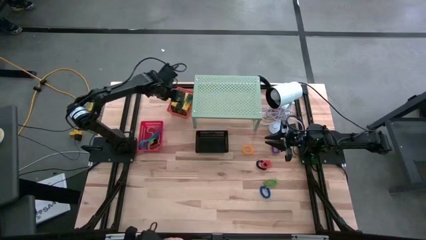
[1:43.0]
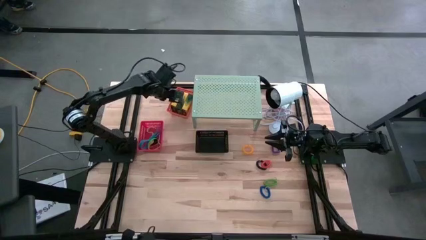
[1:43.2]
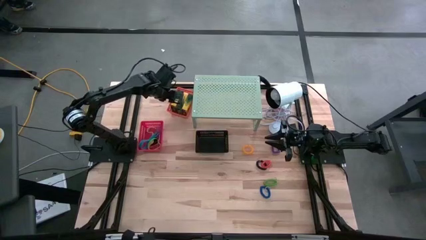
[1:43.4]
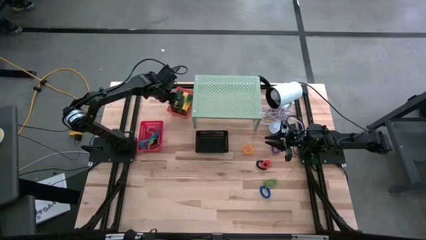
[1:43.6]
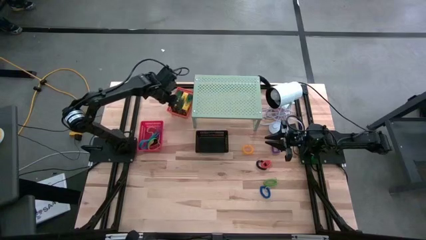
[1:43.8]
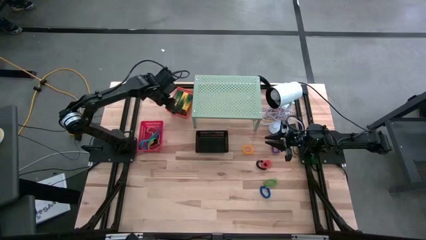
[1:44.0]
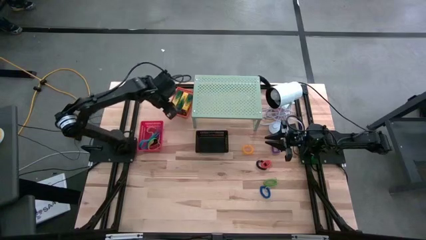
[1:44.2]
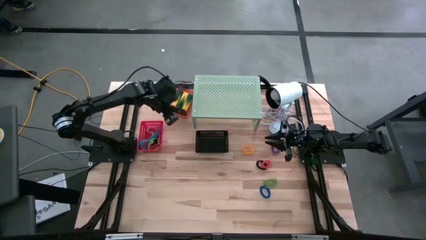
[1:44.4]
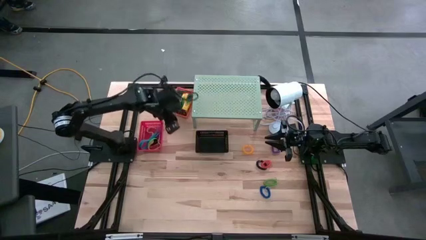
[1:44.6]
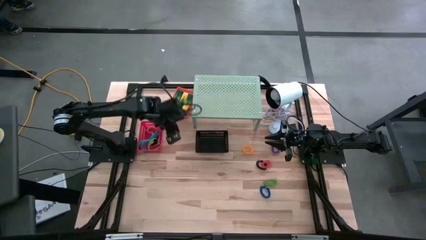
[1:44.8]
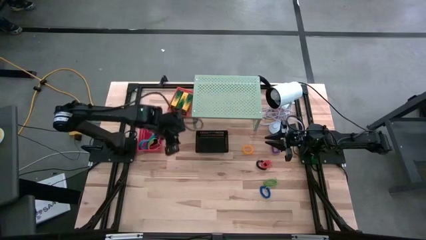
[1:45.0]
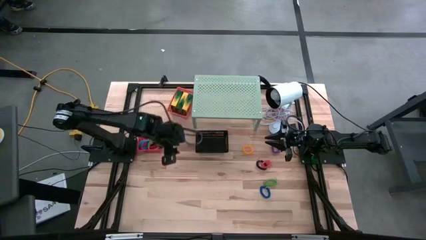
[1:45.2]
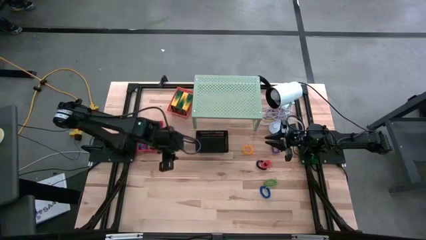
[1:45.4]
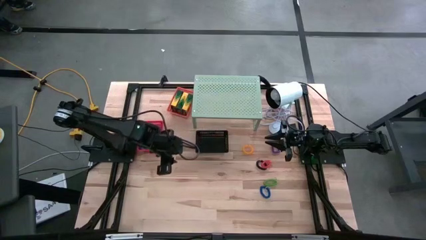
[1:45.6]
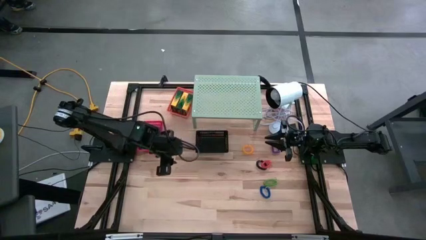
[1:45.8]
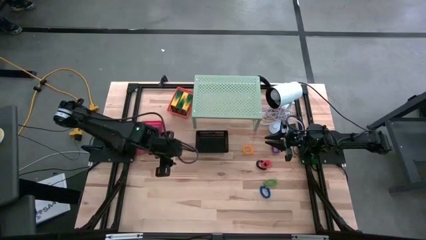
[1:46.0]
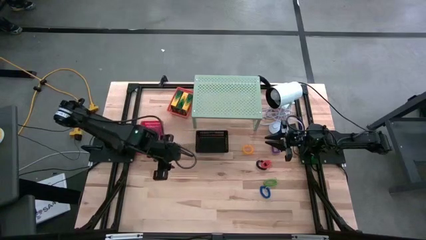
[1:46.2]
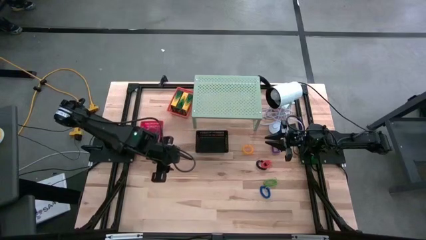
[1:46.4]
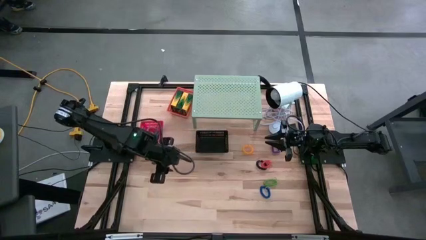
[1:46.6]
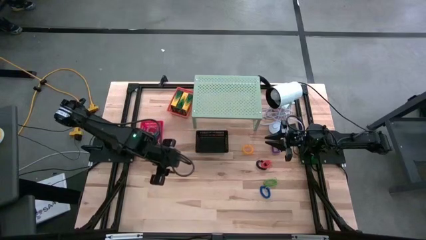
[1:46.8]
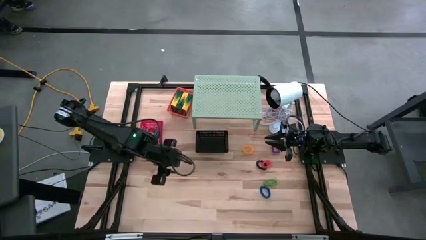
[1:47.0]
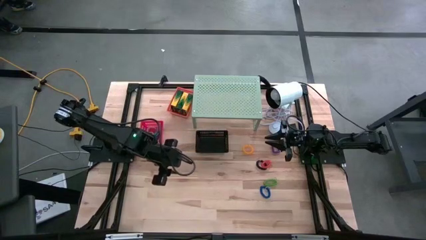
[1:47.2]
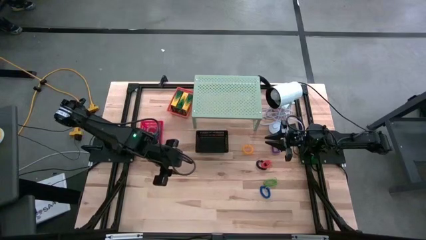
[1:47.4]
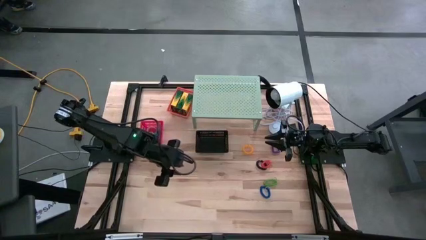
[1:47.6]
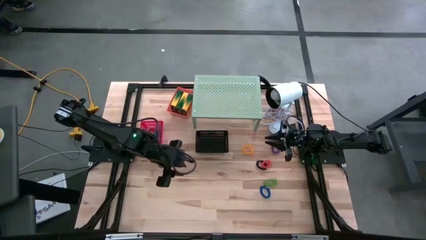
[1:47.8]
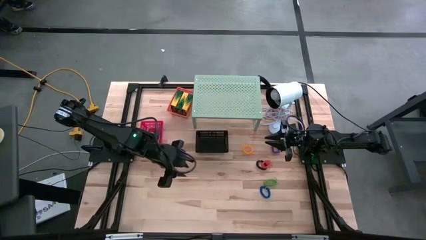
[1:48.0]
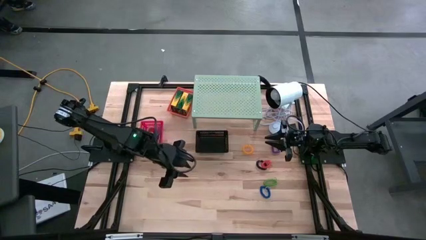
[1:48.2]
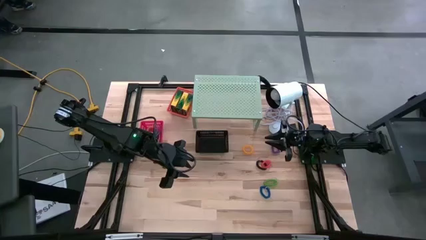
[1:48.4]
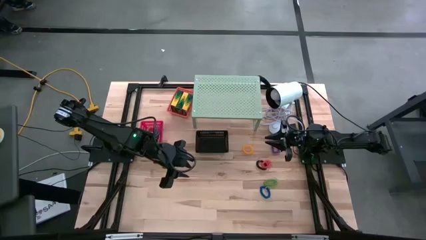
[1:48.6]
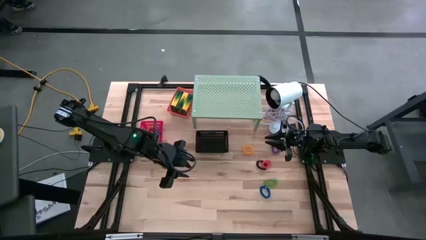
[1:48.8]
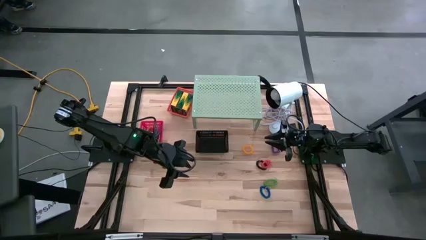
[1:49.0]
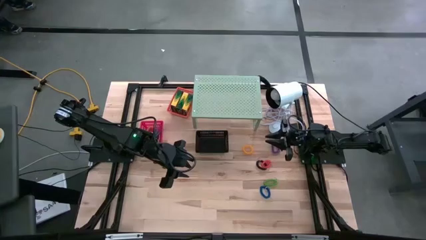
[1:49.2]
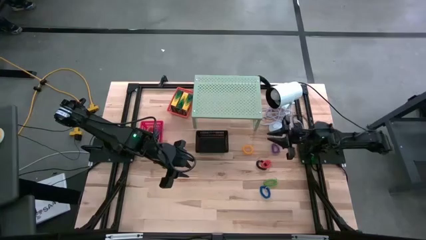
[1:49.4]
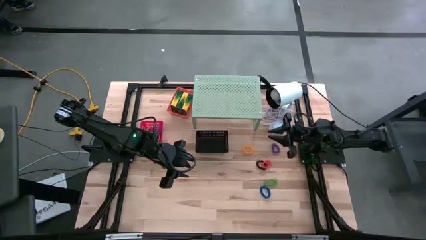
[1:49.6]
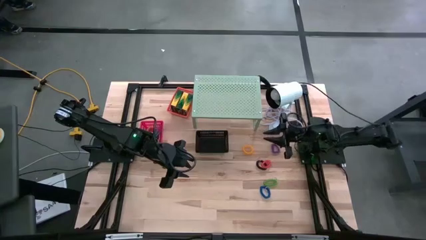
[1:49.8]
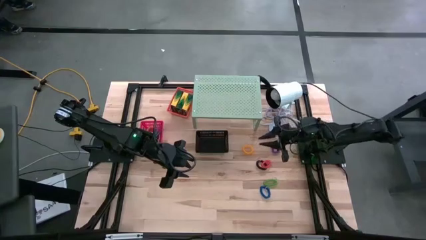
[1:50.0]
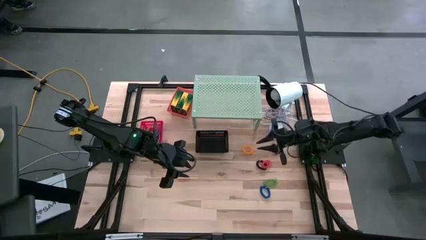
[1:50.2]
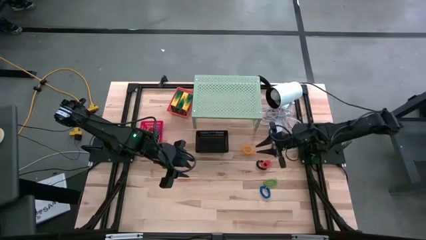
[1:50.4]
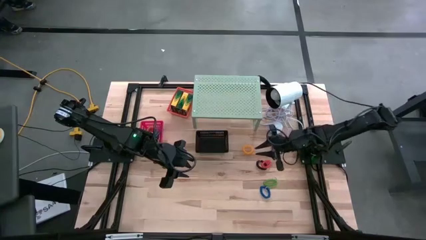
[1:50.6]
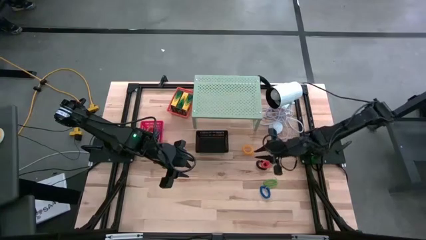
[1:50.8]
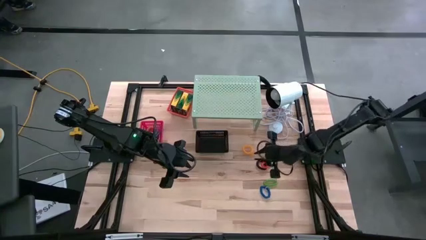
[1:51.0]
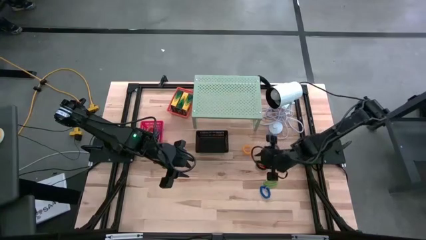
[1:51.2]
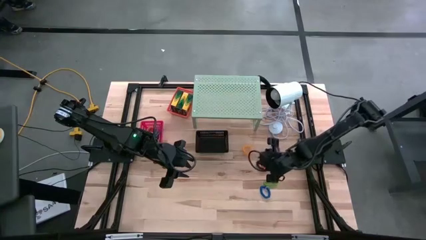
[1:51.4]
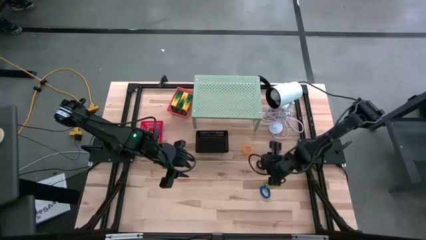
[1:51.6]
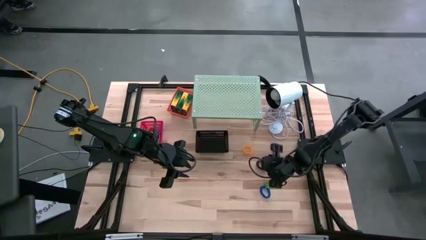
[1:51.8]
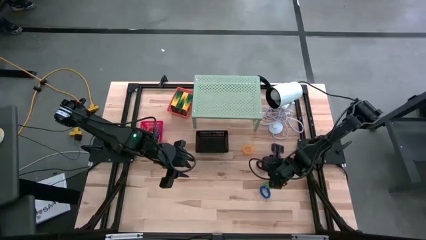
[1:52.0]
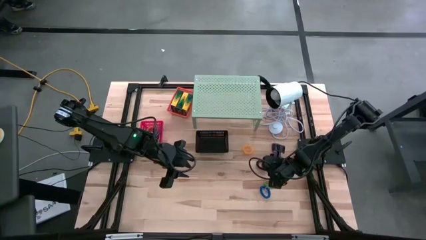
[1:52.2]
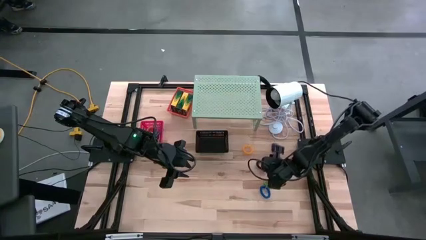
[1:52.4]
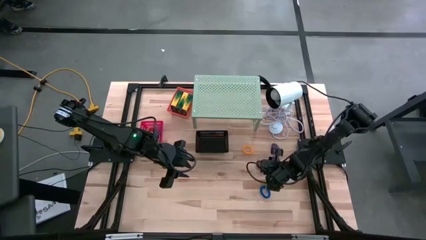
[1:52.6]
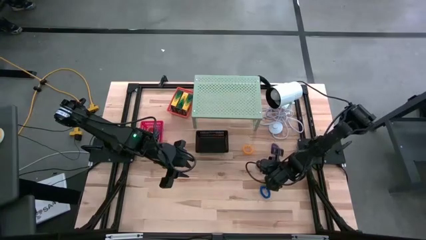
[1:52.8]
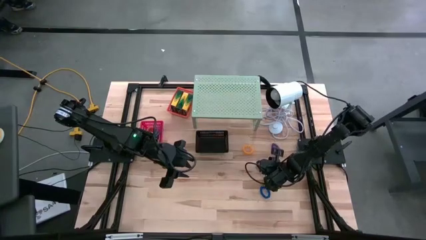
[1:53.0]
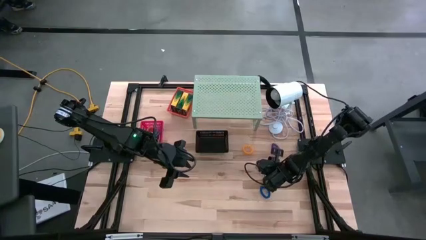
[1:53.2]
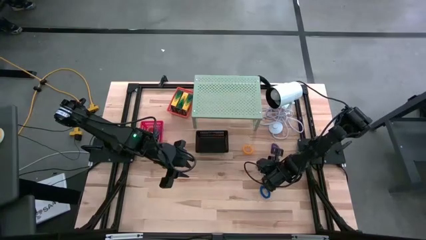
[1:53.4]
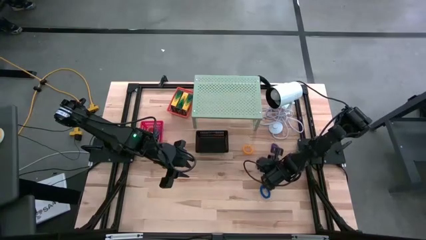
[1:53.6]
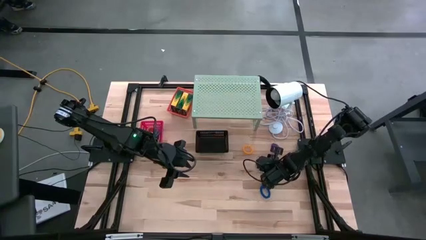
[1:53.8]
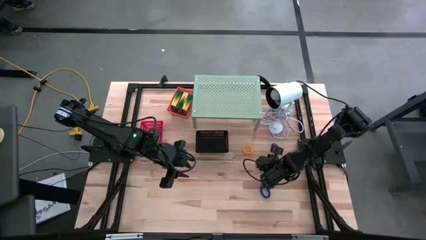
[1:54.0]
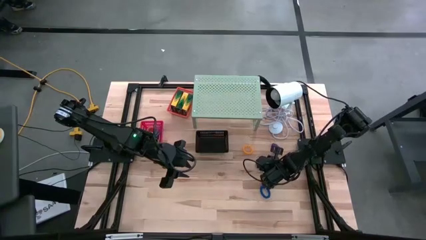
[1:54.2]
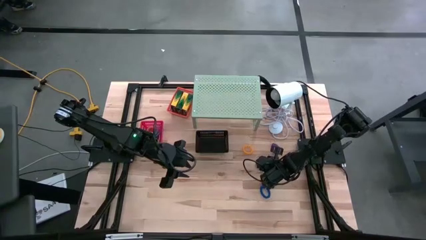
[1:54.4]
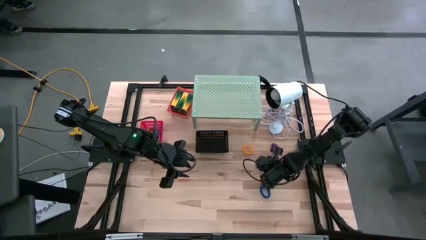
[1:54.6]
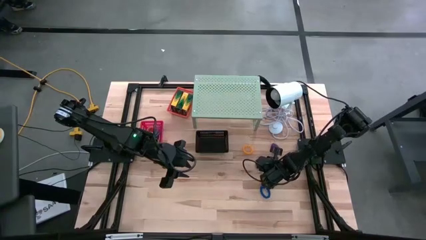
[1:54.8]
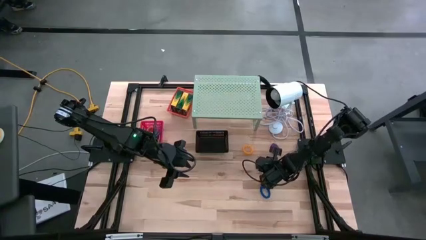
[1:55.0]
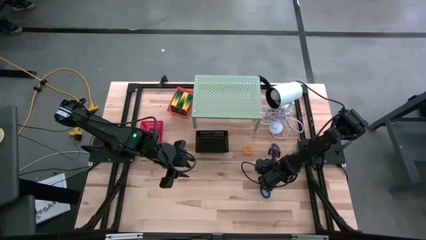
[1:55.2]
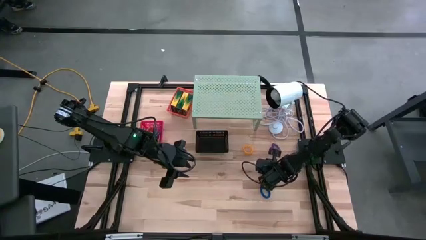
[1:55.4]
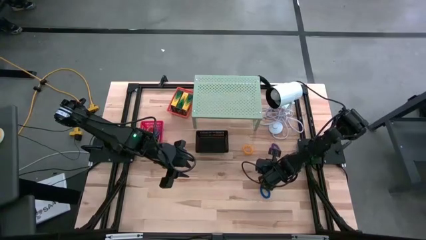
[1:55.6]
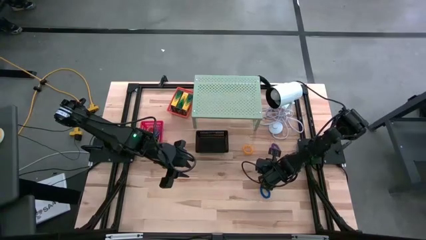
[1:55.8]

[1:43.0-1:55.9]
Task: Pick & Place Office Desk Supplies
Put the orange spring rubber band into the black bin on the shelf

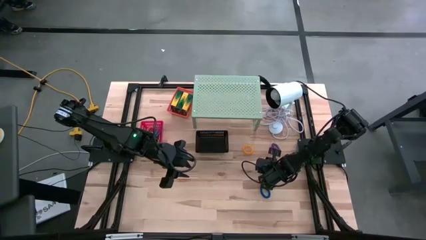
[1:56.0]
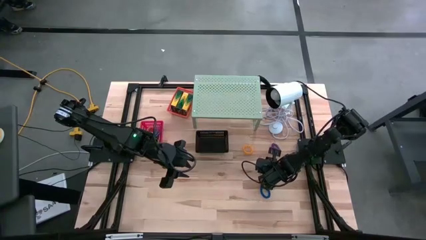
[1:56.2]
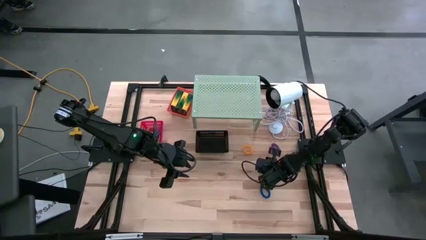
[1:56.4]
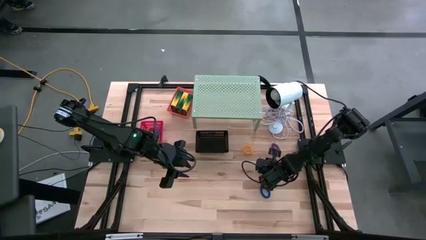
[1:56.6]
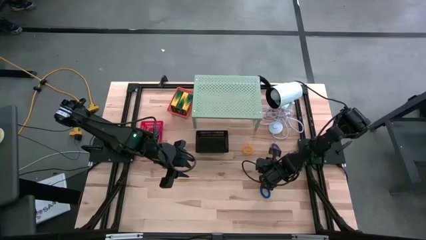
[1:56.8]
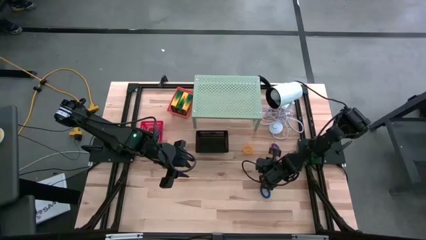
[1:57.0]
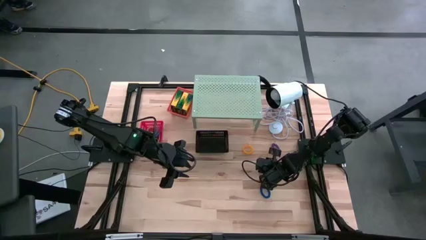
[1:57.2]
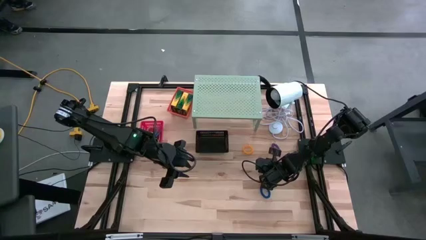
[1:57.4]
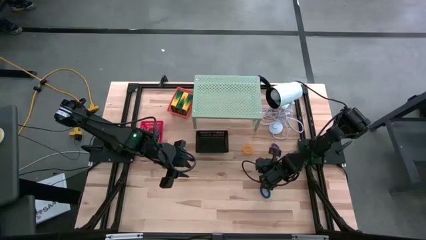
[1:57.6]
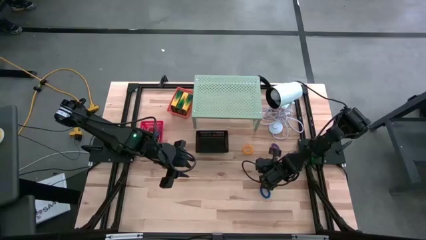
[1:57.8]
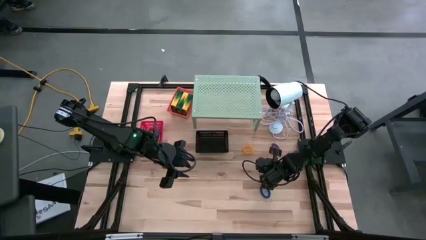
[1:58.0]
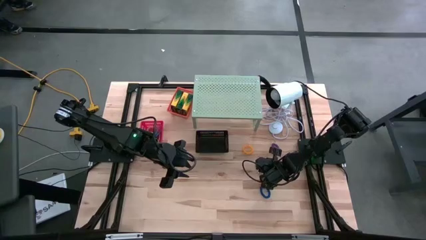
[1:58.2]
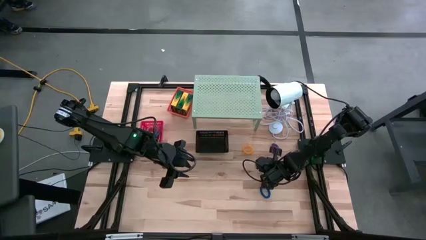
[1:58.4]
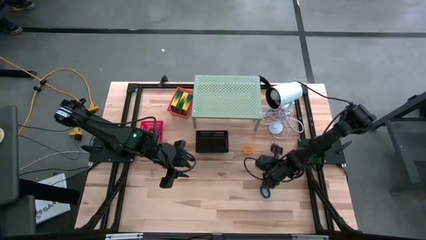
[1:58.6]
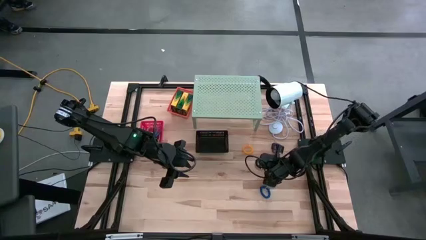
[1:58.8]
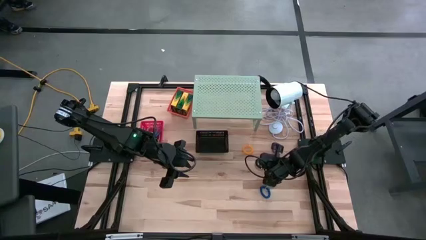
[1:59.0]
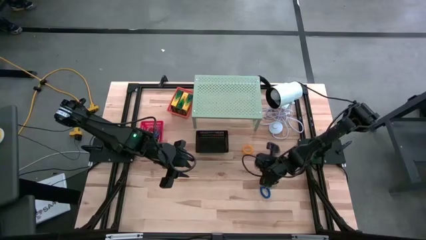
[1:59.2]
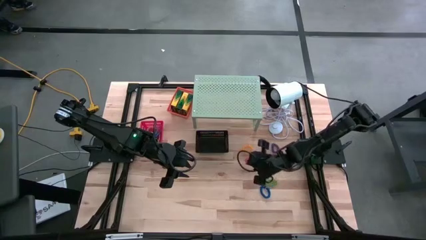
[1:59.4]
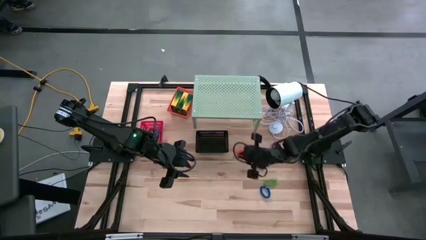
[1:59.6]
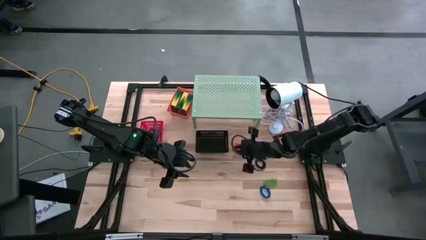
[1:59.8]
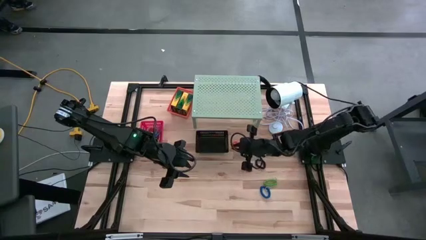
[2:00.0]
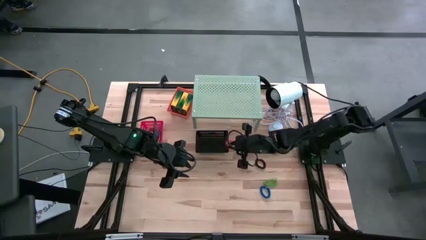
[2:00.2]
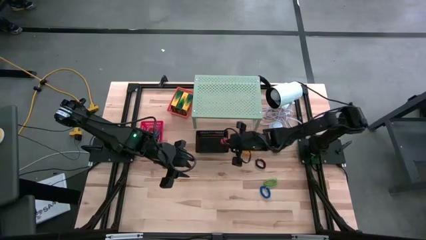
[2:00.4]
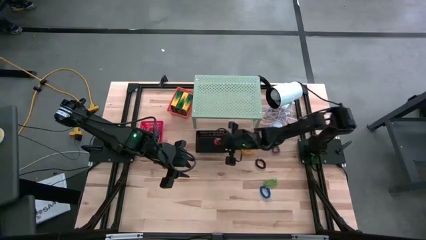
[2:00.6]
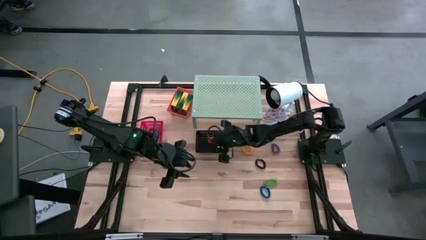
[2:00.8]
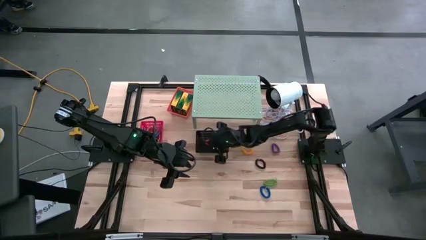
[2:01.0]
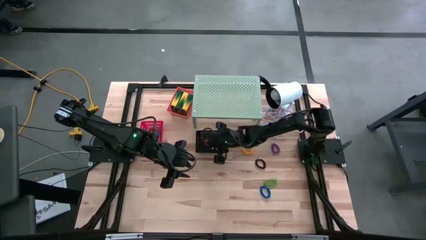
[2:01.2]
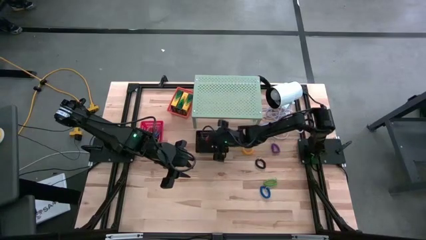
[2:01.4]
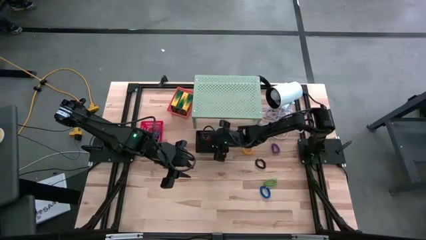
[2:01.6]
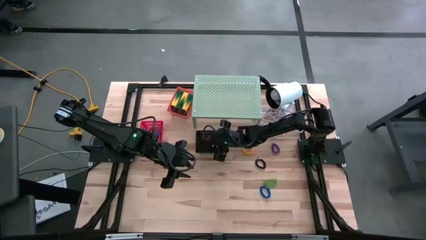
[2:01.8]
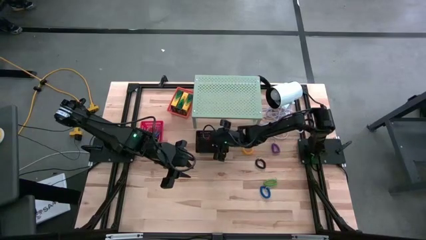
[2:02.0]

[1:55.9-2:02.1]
Put the orange spring rubber band into the black bin on the shelf
